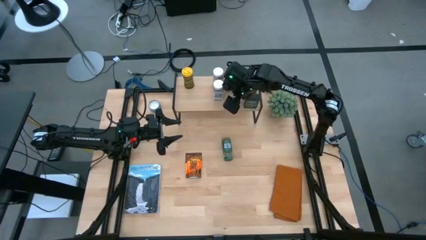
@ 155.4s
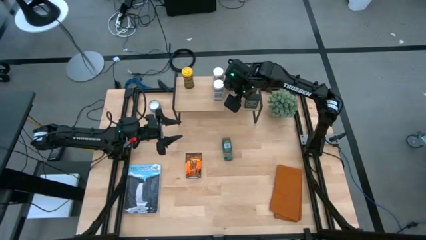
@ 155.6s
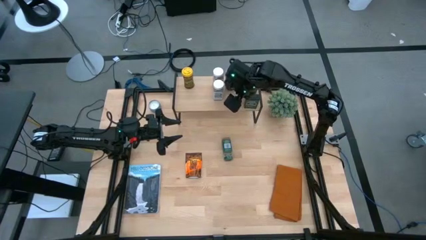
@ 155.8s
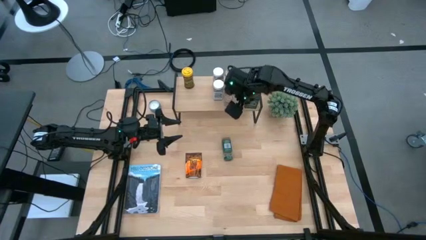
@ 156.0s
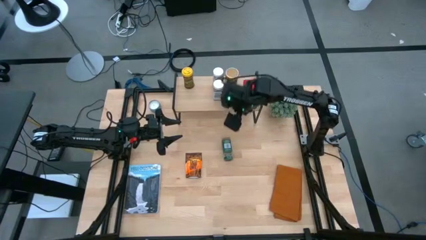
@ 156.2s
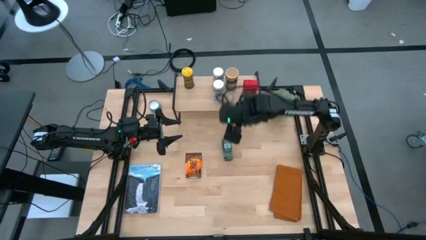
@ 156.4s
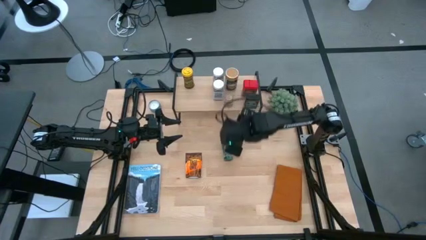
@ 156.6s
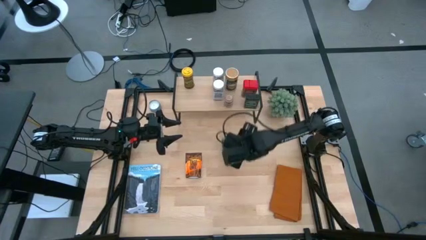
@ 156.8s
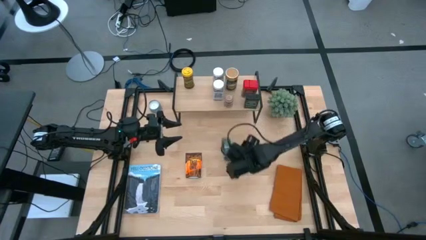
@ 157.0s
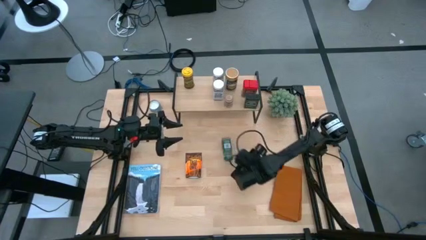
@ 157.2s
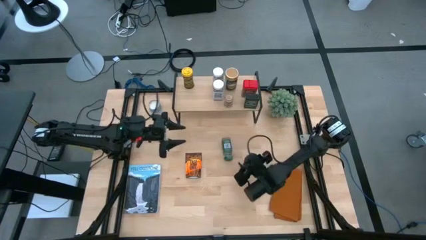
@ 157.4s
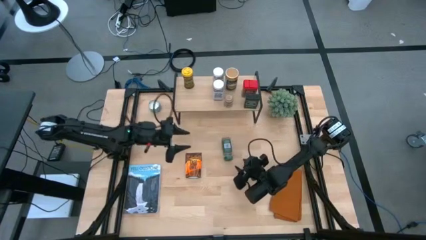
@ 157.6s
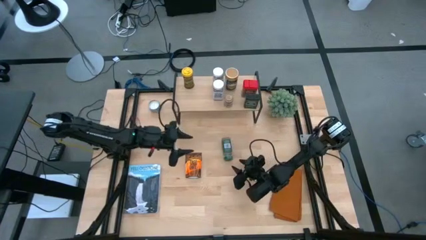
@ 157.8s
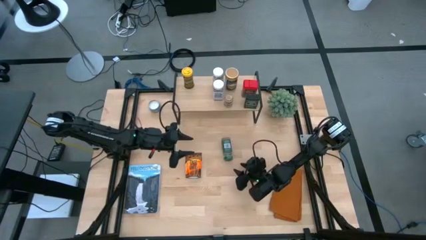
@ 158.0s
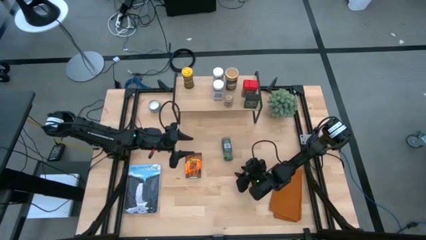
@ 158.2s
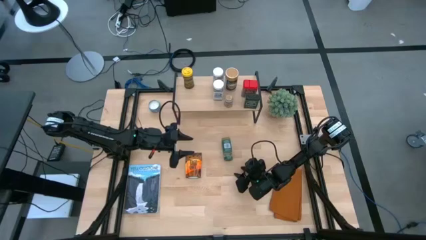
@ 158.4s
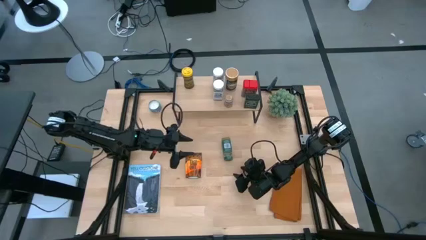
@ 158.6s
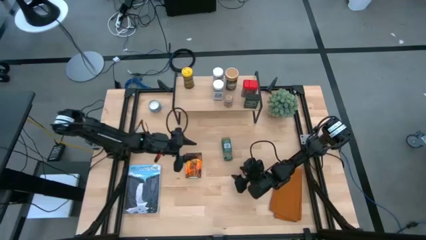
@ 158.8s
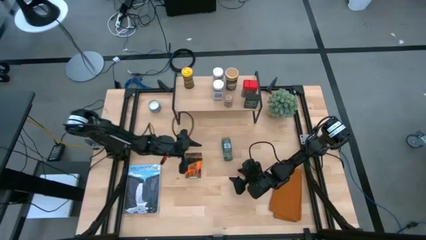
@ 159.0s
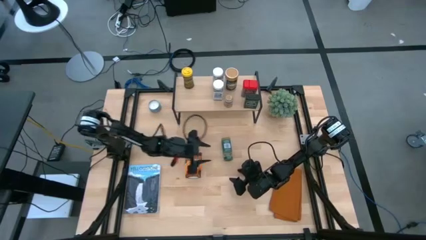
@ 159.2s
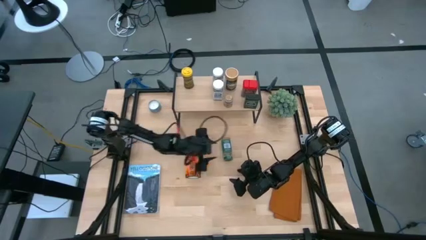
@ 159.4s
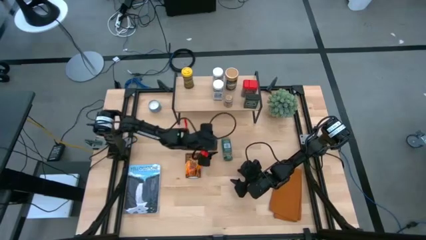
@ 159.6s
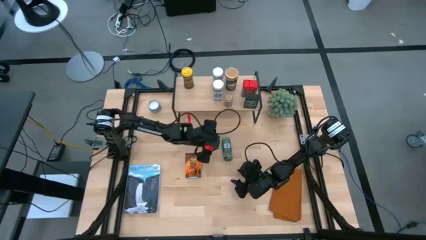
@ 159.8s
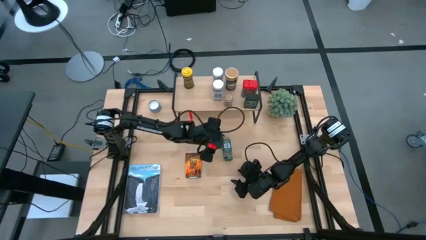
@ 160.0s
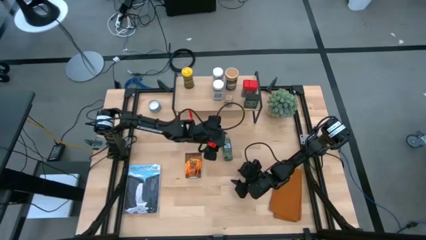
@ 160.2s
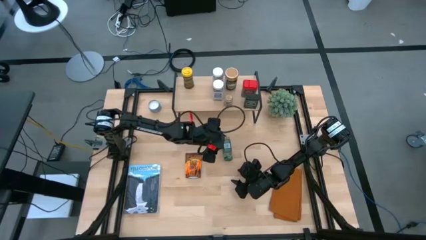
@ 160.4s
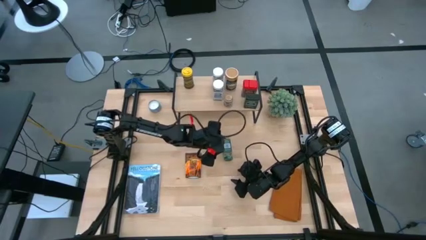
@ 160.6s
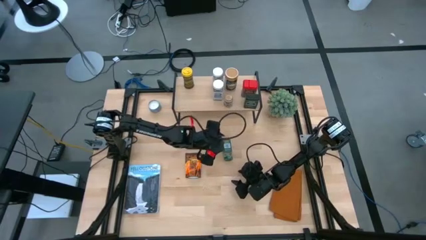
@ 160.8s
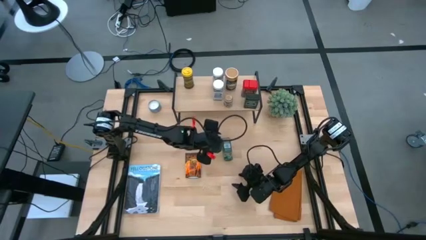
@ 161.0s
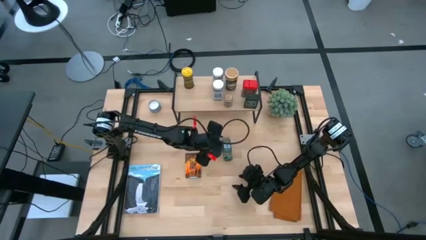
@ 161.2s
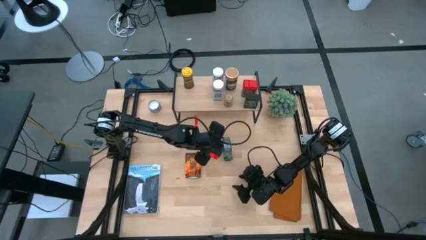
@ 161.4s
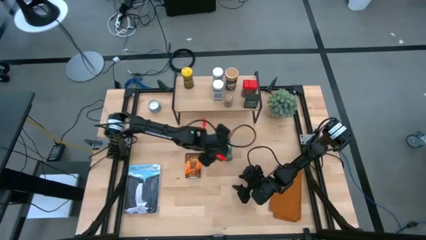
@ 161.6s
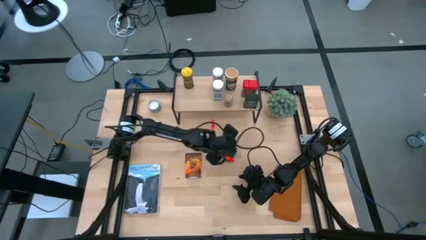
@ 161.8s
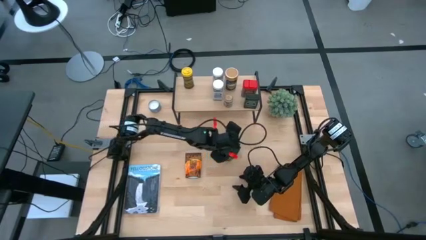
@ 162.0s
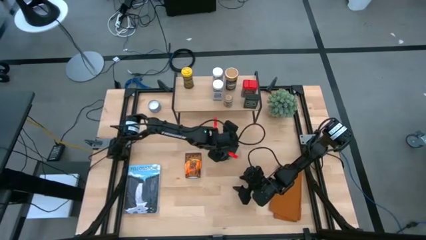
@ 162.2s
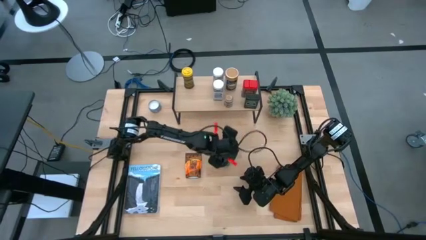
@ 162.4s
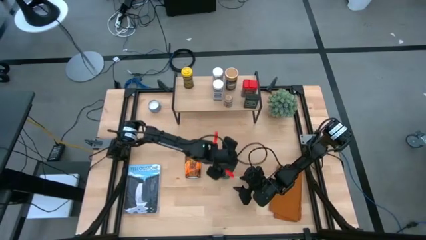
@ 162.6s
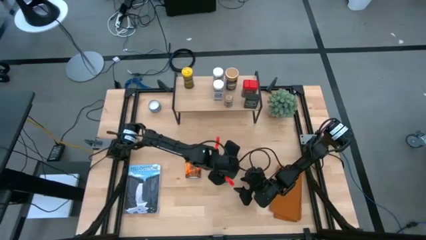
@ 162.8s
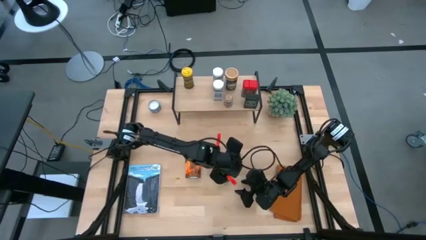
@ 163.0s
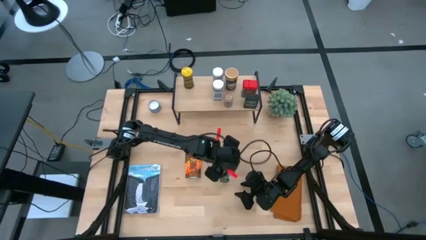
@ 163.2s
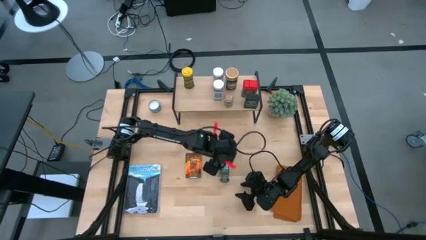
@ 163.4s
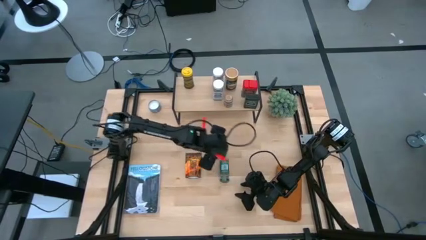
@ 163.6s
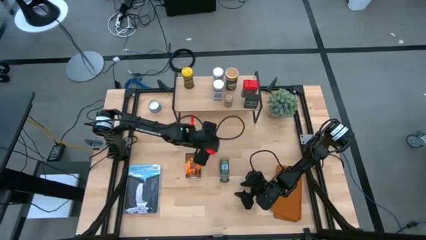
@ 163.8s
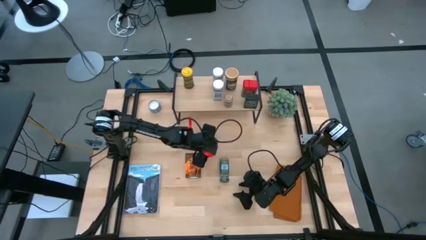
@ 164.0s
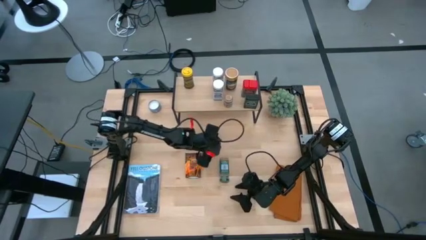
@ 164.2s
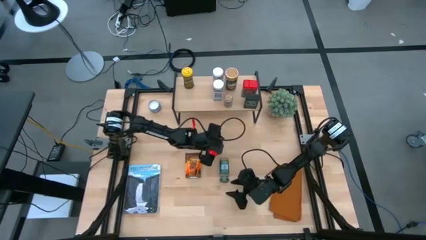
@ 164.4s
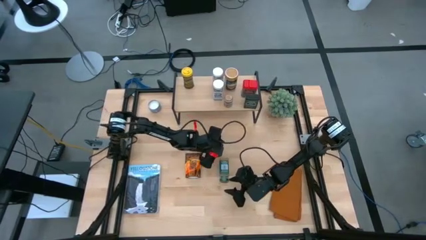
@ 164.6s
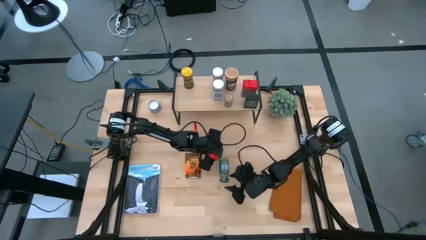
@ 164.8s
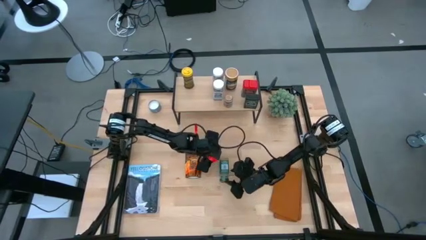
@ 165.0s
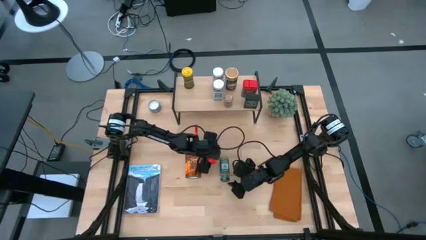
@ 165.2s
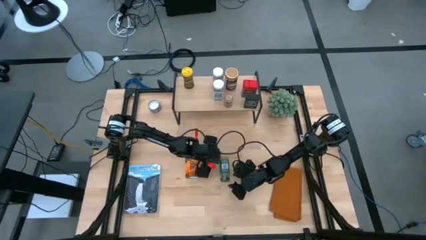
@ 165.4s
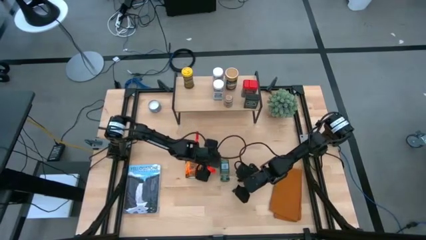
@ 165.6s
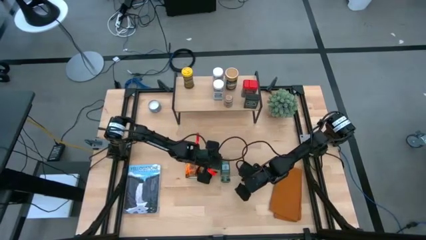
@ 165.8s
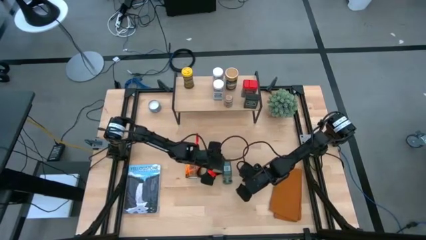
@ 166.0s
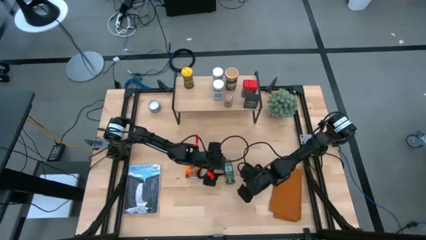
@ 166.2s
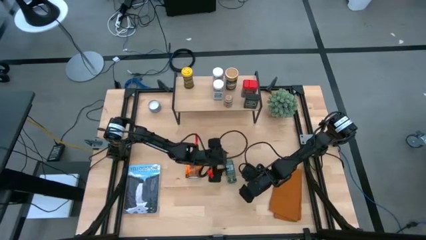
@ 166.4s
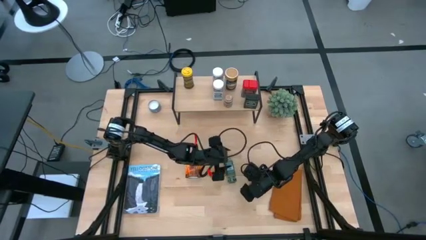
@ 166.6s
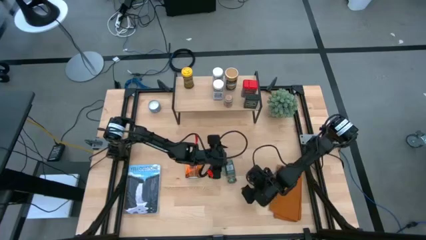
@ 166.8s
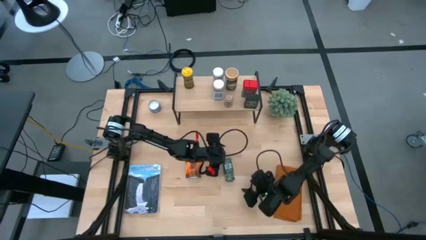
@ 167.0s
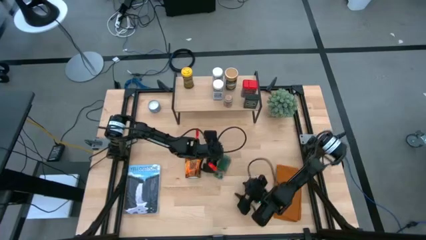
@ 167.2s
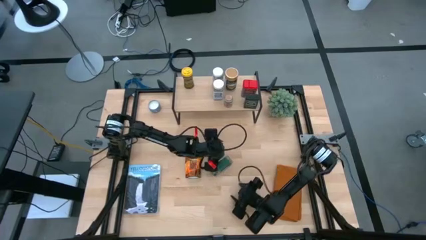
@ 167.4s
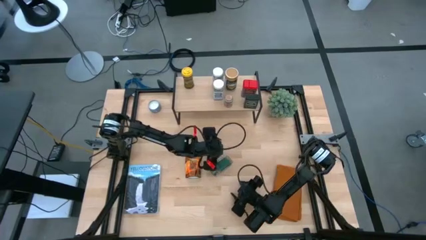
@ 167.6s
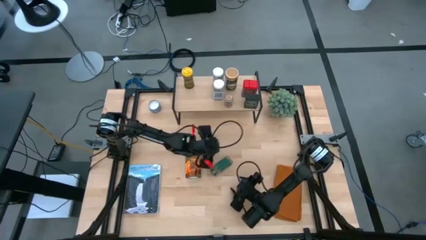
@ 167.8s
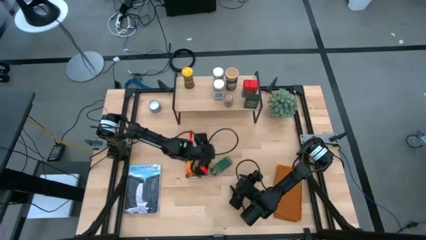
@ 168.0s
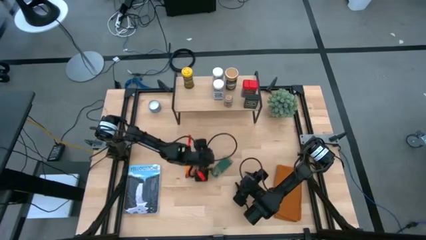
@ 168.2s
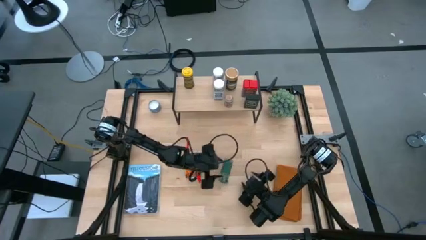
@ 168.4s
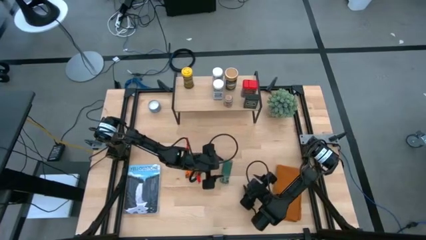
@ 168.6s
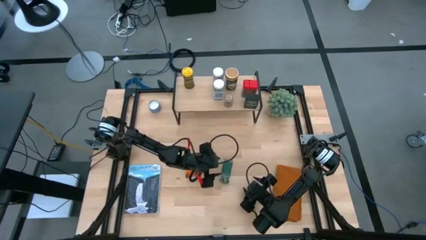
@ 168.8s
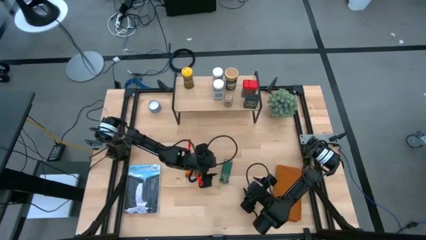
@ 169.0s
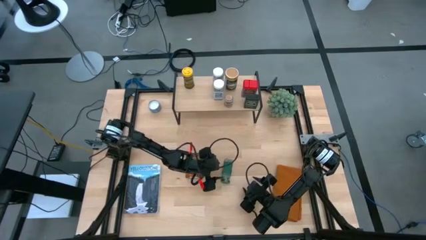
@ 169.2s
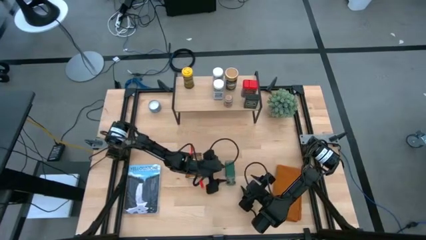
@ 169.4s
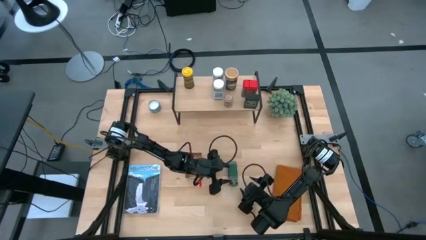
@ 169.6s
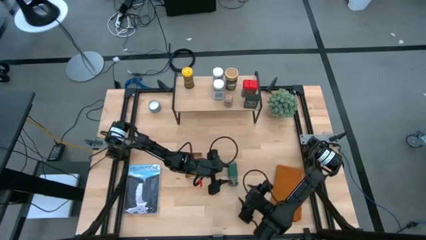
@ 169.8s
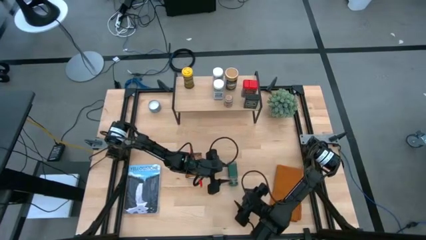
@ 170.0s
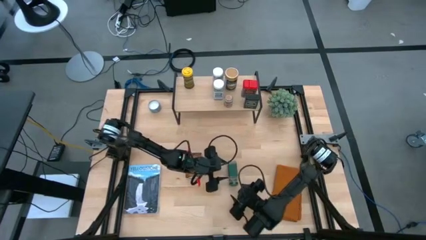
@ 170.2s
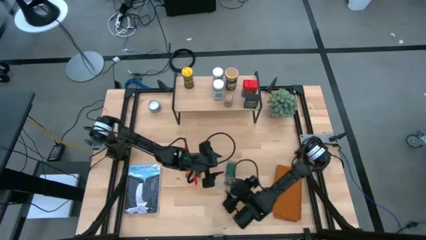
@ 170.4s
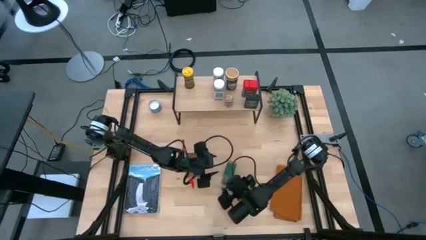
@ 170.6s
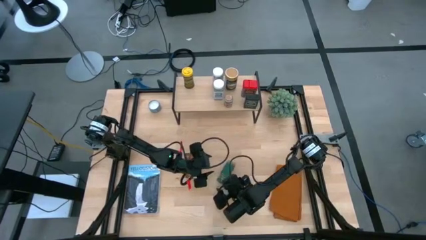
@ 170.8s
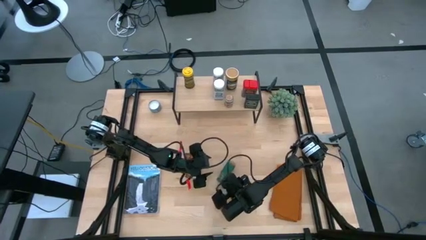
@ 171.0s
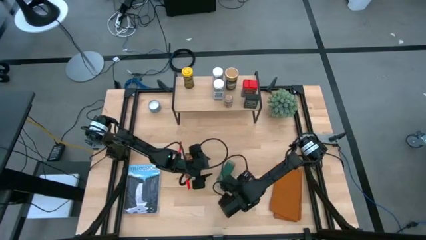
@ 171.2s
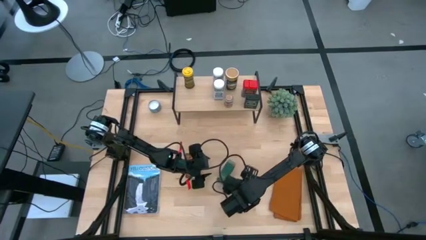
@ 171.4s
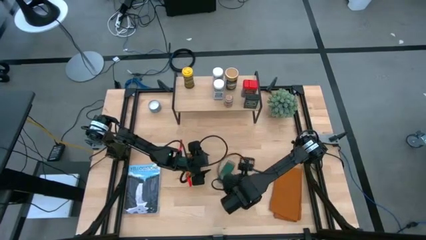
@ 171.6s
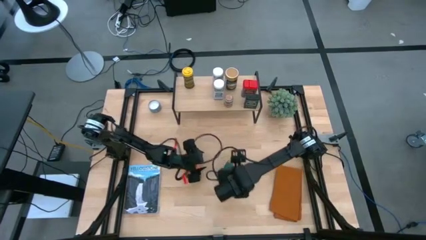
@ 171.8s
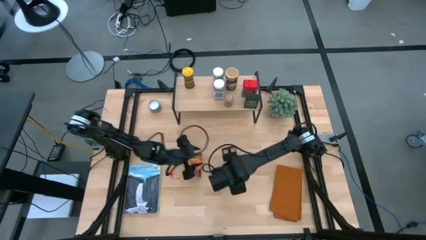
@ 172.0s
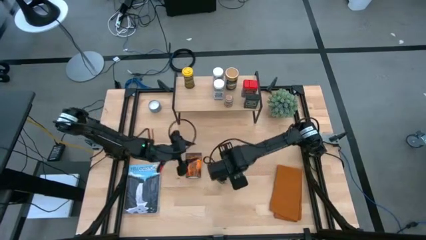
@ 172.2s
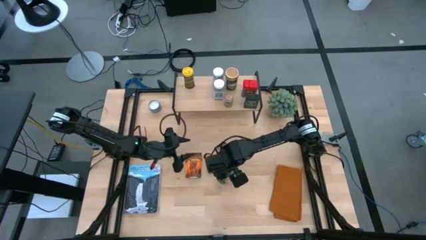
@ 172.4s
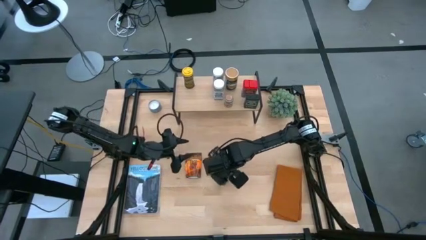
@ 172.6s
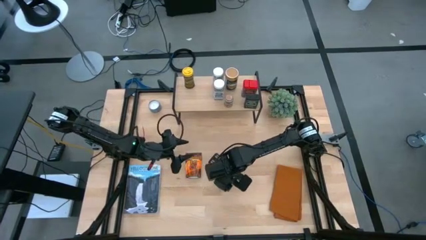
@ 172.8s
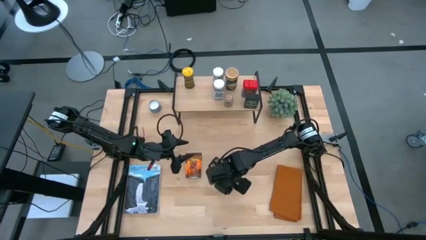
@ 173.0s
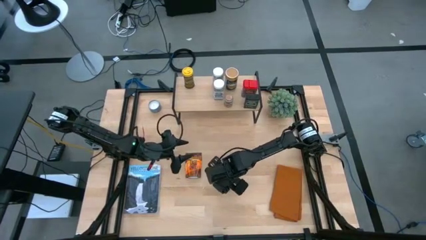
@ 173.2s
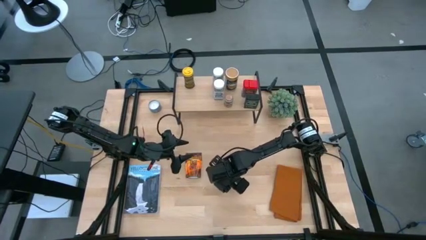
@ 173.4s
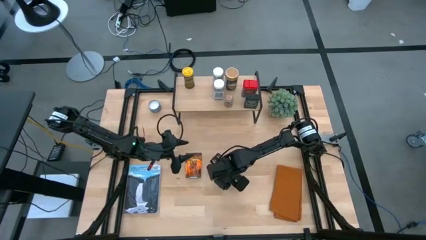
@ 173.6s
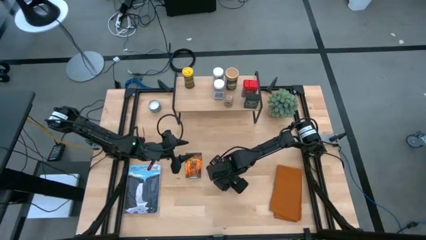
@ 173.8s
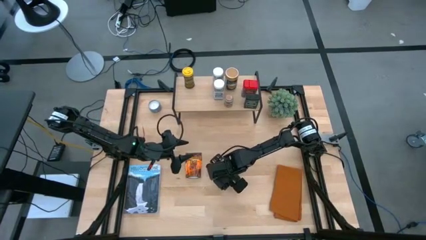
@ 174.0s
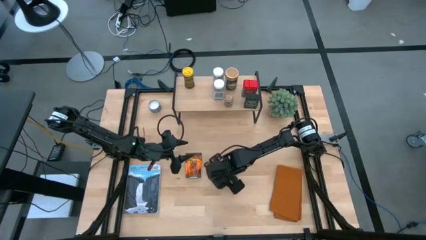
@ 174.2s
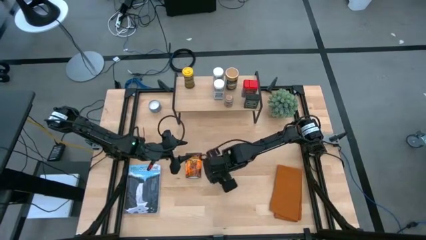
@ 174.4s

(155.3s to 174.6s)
Task: Shelf spices
Put the green bottle seasoning on the shelf
